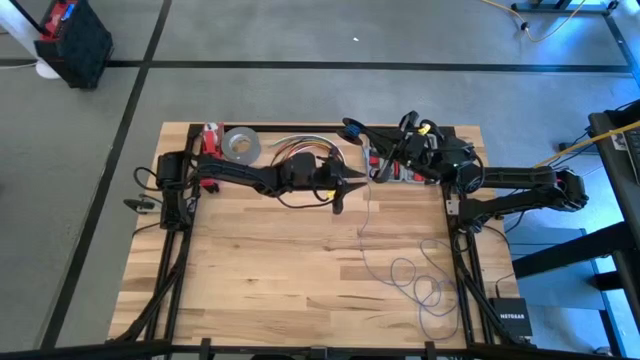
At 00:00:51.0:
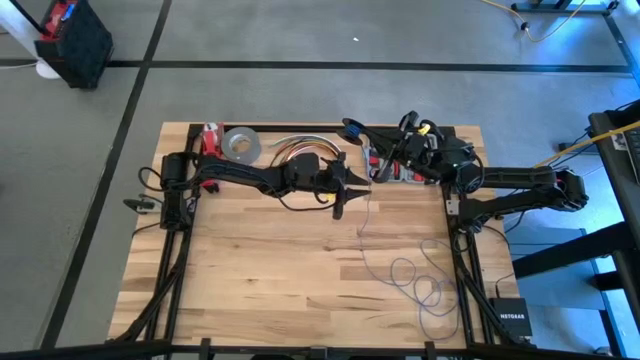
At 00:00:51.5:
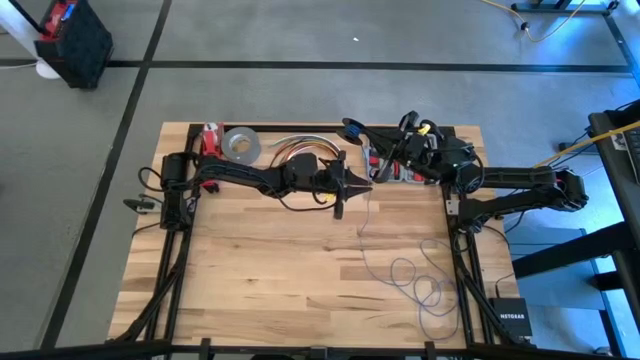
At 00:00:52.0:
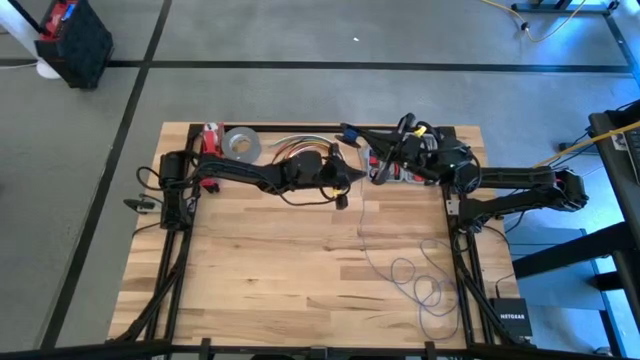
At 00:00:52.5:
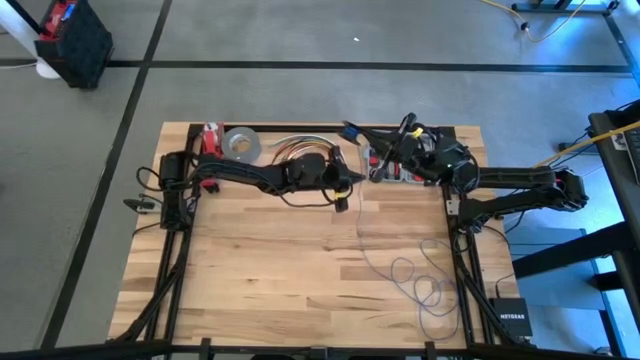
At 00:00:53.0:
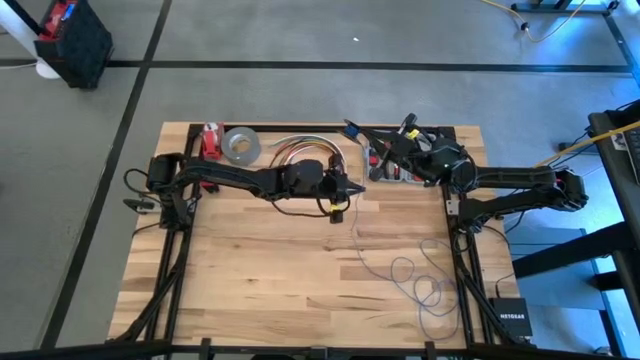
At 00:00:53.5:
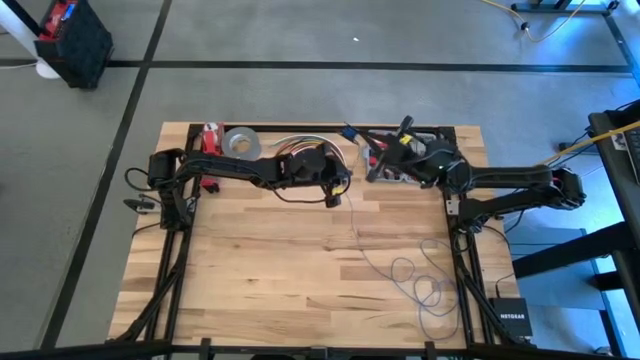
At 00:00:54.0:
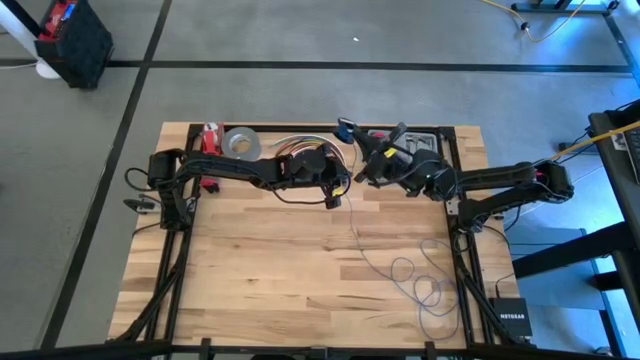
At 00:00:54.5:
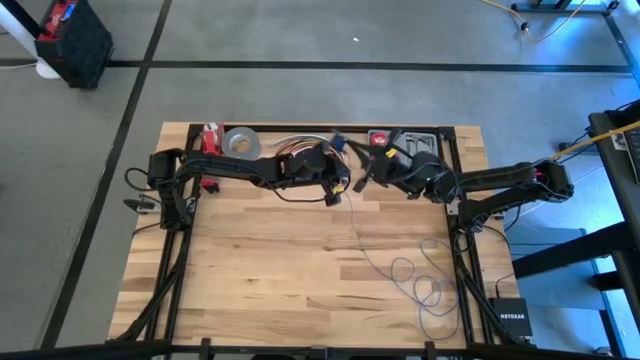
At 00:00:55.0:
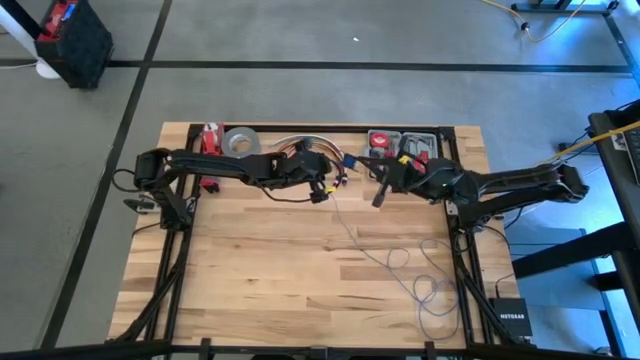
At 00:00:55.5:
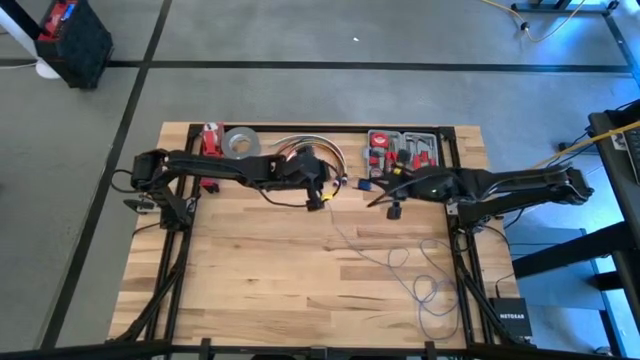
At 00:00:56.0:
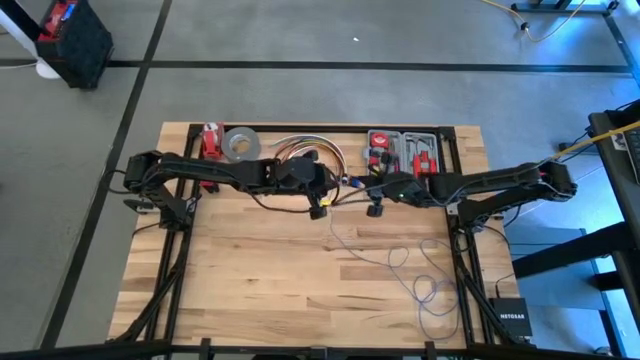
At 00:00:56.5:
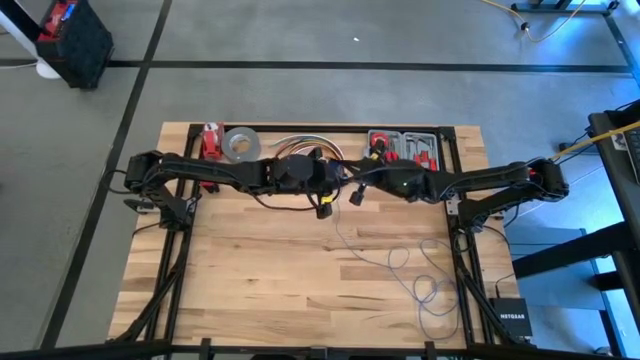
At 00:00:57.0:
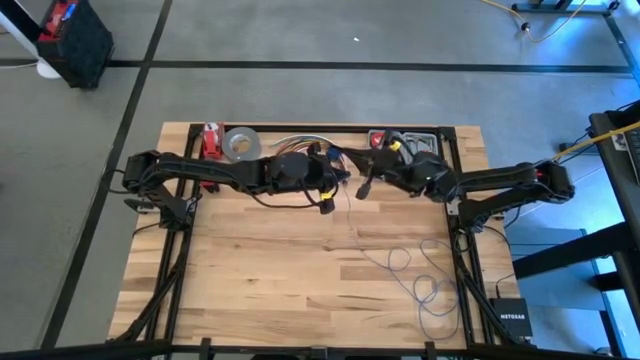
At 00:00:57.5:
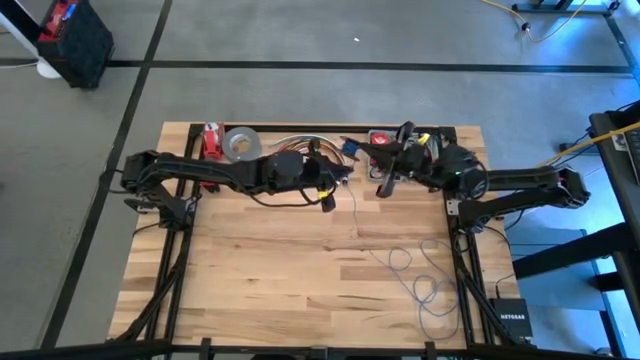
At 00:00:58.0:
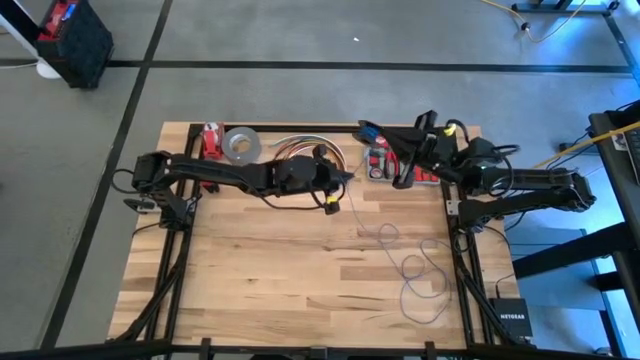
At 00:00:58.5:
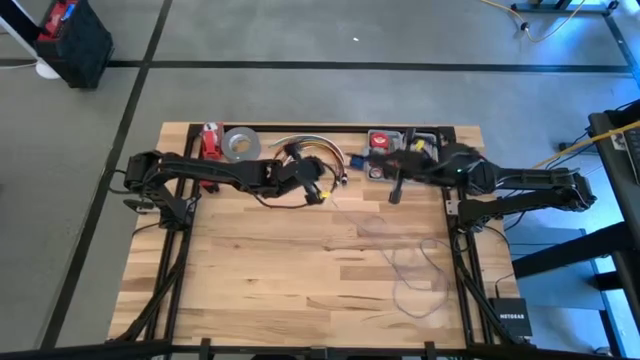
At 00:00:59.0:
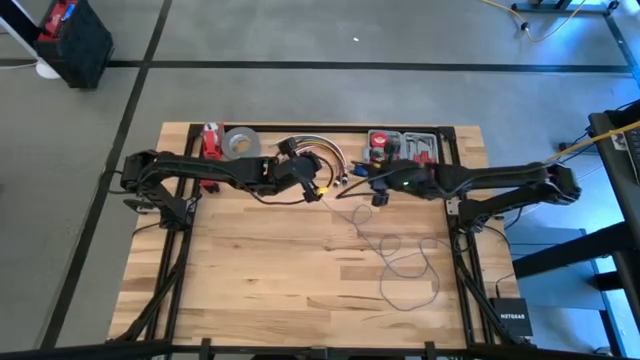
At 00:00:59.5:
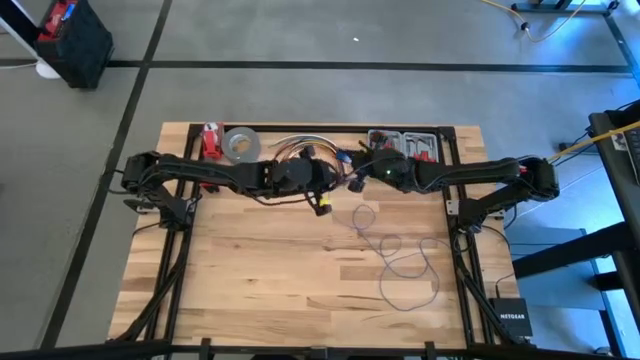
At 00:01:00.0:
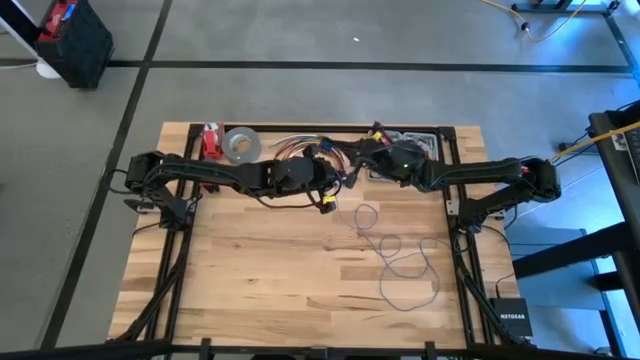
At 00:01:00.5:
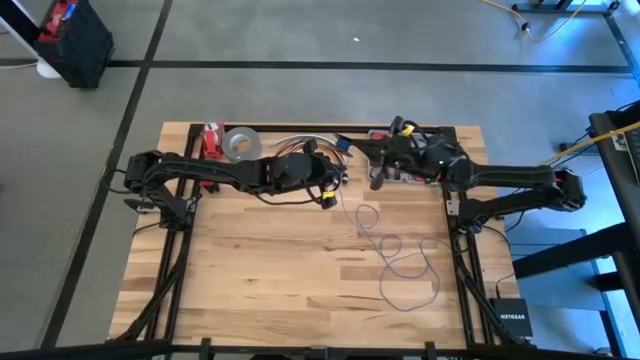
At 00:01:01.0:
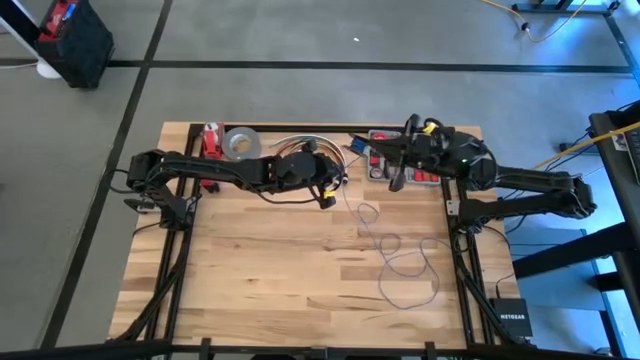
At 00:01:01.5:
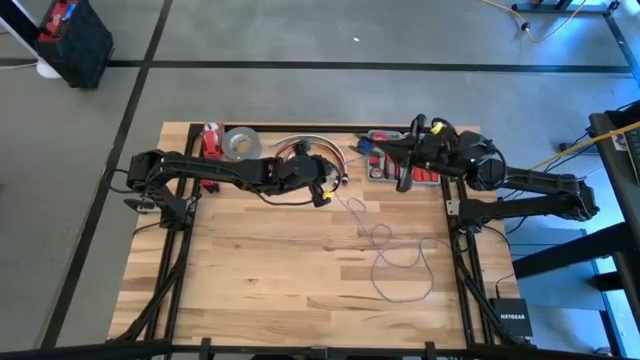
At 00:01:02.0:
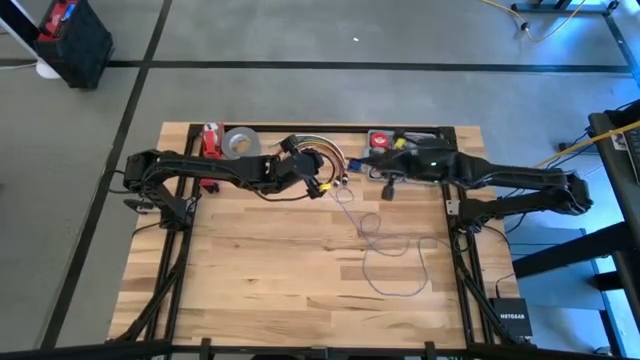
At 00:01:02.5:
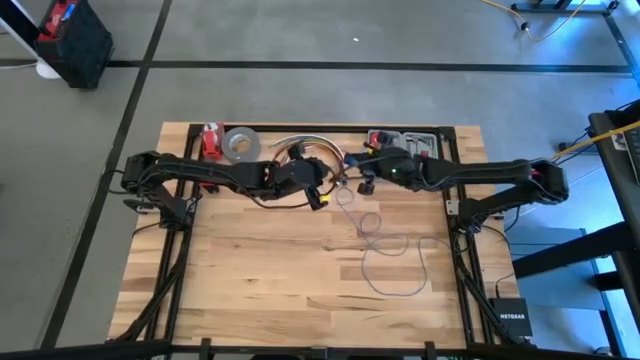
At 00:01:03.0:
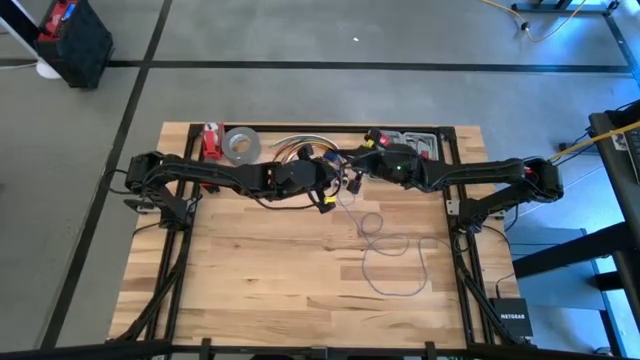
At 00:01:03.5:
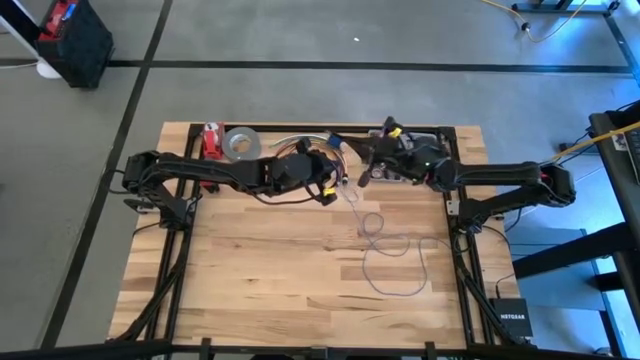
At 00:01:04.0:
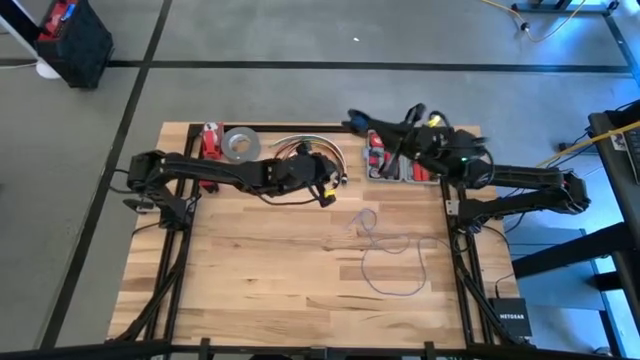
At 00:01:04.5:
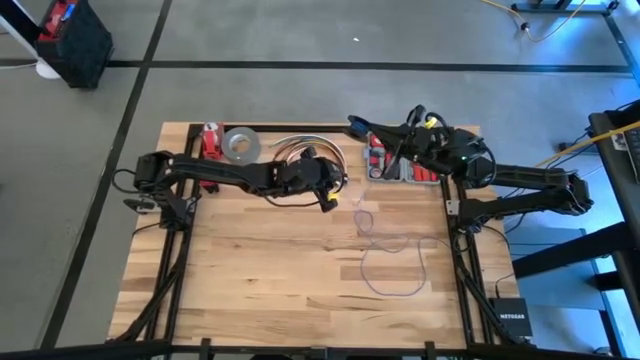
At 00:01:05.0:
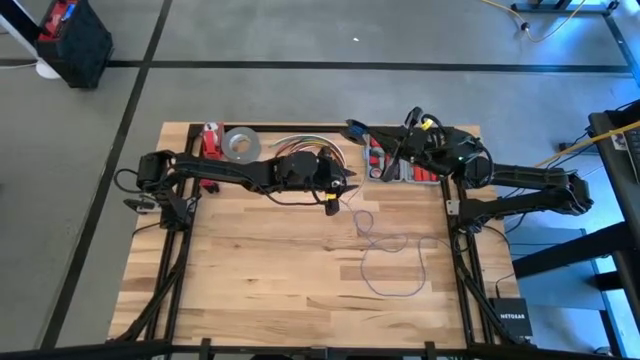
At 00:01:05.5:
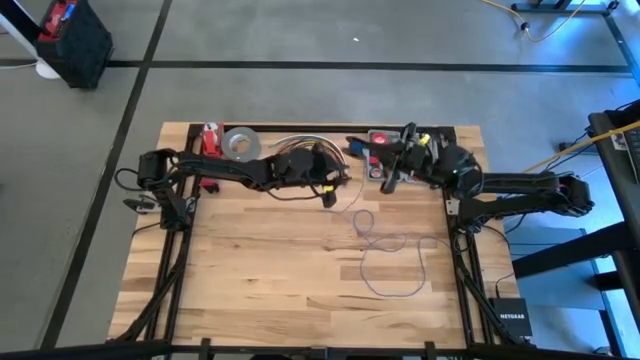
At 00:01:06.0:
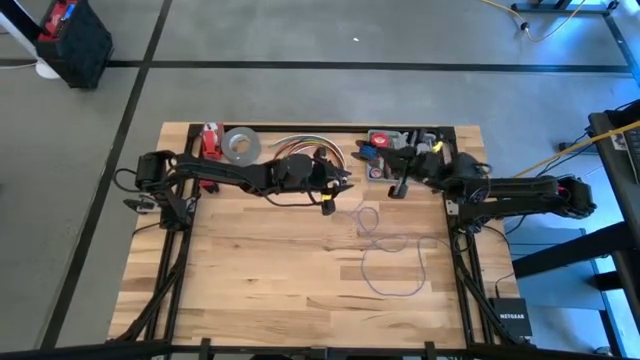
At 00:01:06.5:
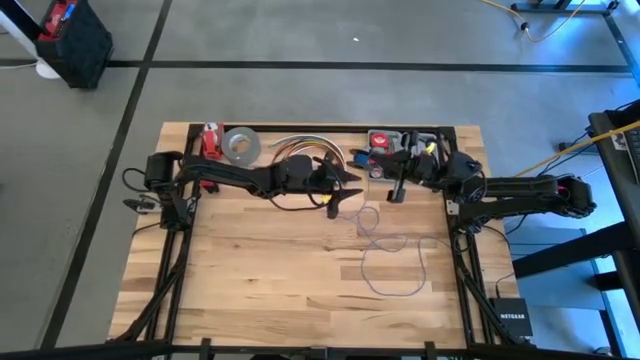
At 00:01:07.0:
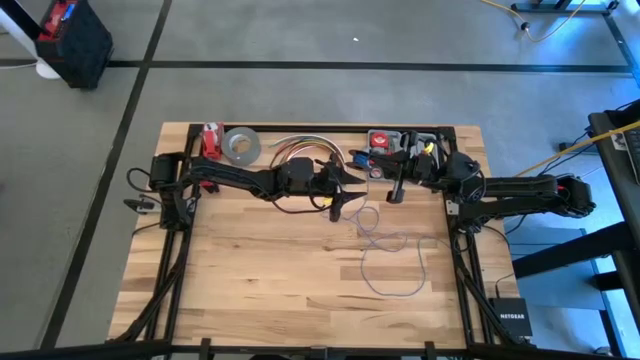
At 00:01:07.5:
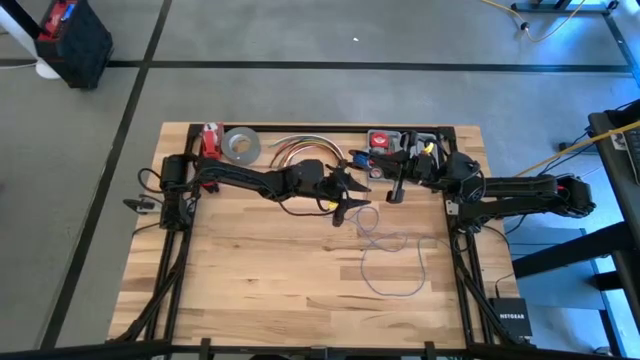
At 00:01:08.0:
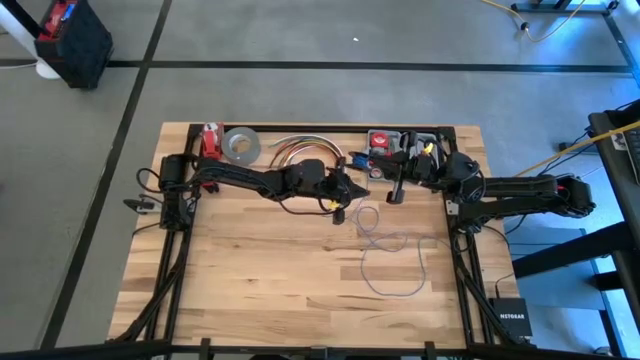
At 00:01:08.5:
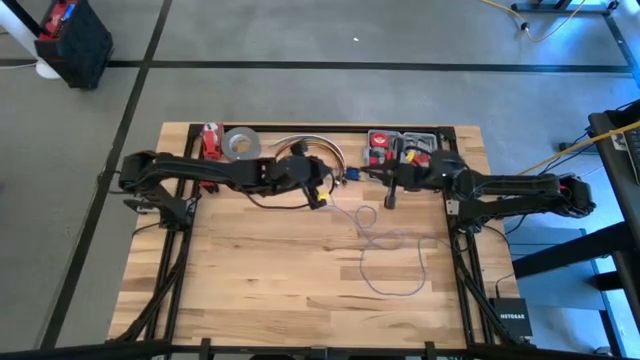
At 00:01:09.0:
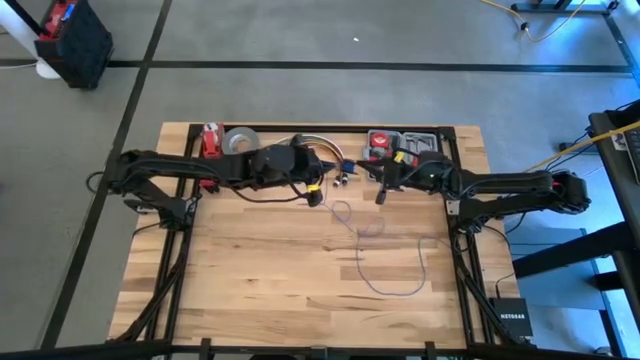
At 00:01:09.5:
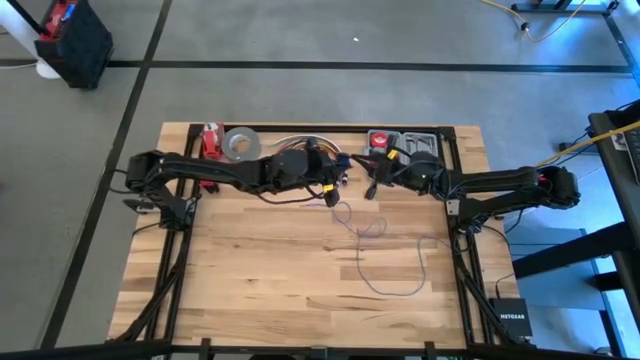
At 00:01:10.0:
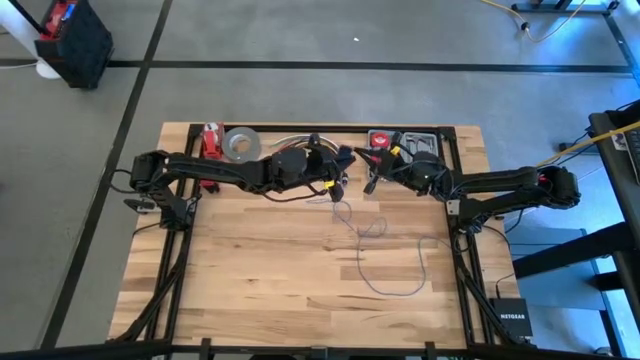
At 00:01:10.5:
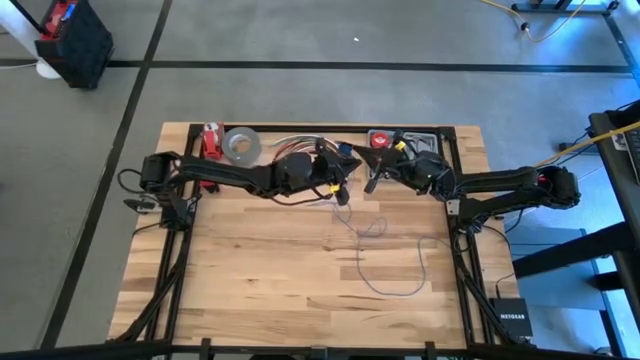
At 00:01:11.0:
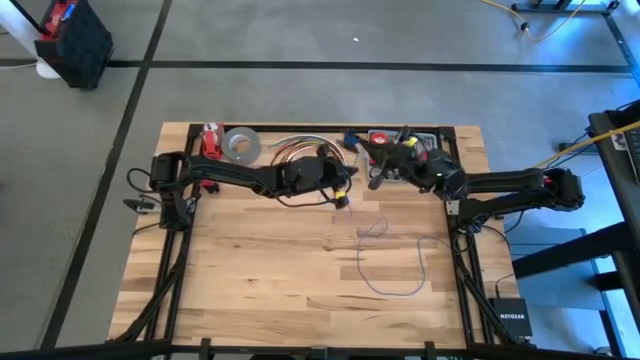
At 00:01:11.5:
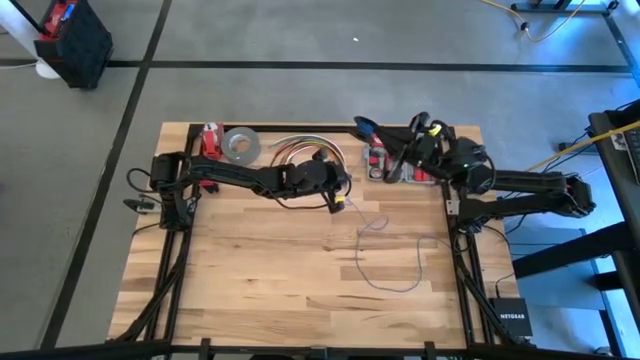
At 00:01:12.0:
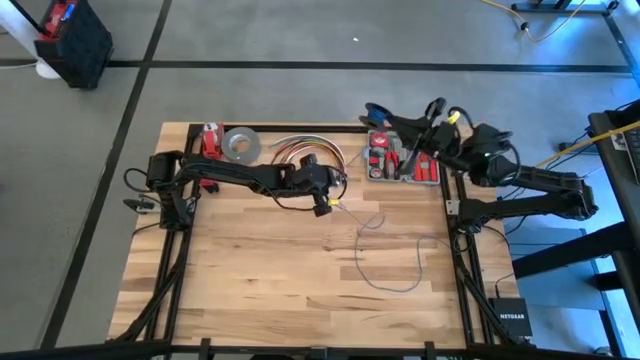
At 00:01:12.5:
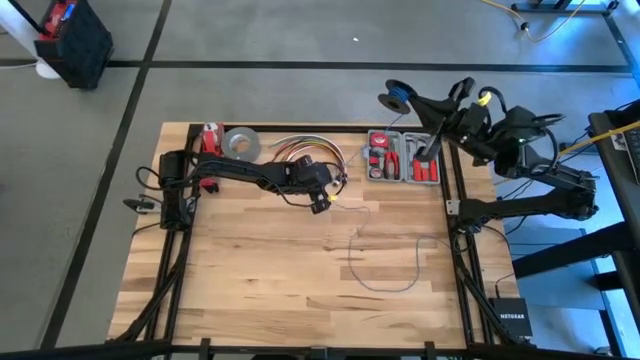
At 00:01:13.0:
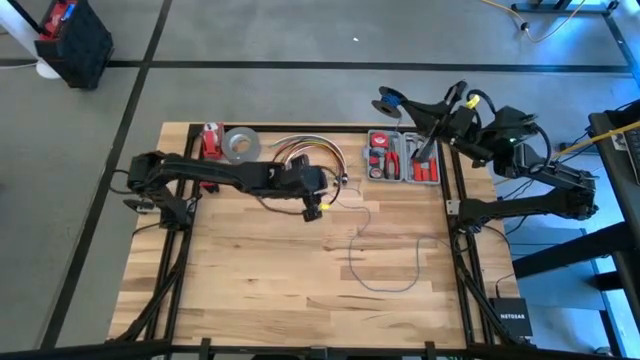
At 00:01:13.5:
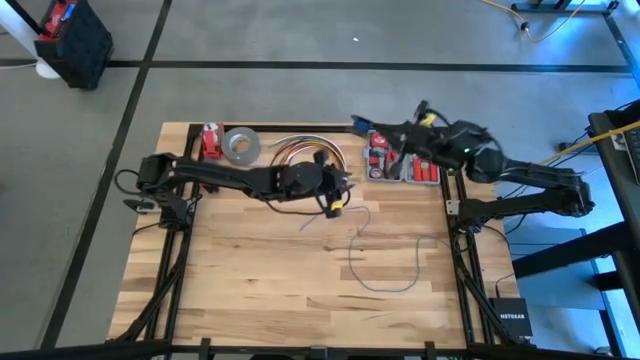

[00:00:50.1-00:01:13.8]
Task: Coil cords
Coil the blue wire on the black spool
